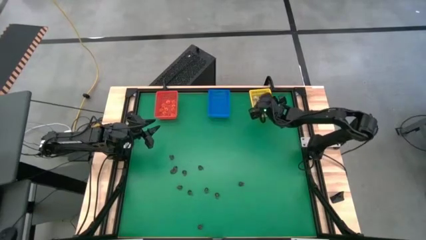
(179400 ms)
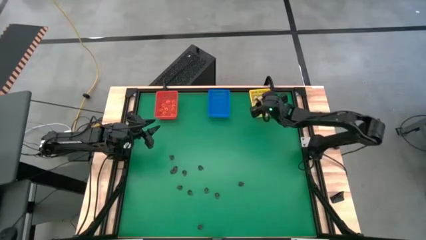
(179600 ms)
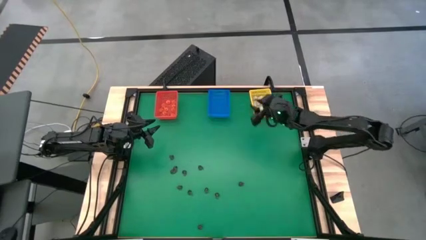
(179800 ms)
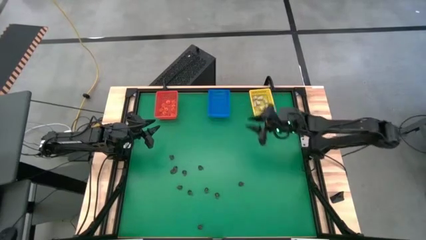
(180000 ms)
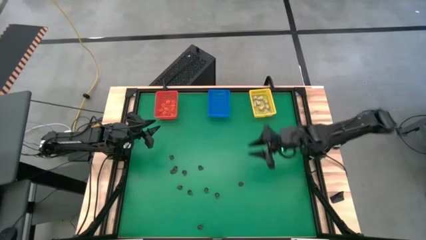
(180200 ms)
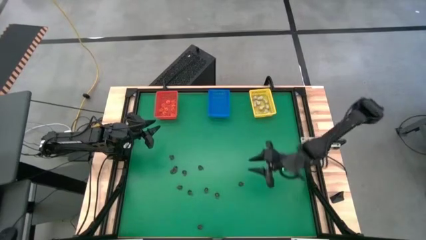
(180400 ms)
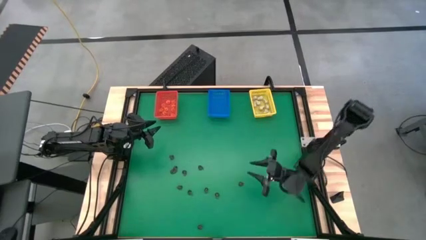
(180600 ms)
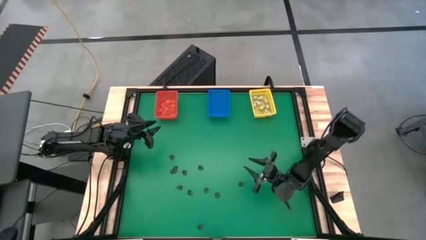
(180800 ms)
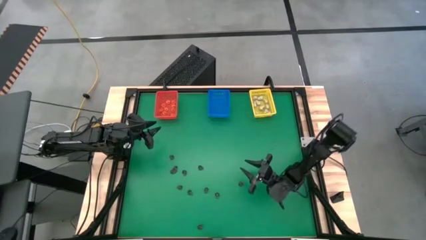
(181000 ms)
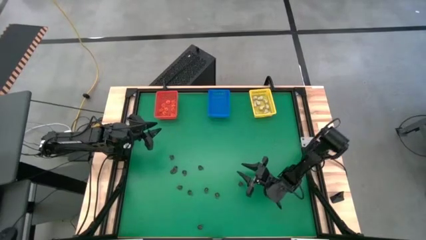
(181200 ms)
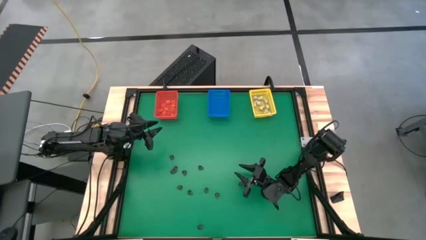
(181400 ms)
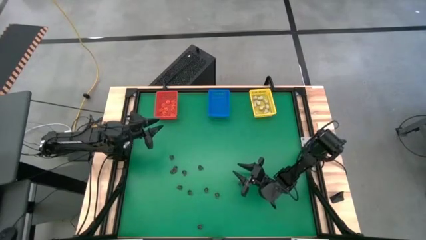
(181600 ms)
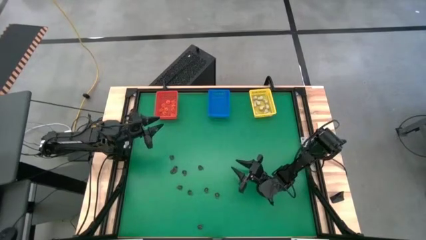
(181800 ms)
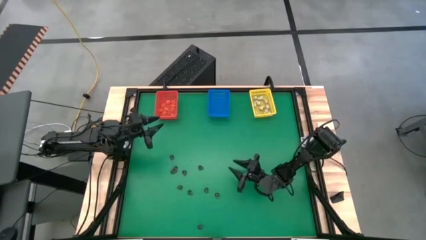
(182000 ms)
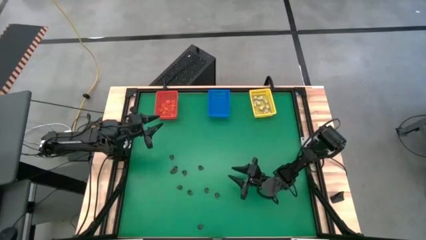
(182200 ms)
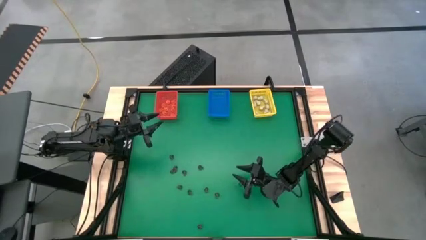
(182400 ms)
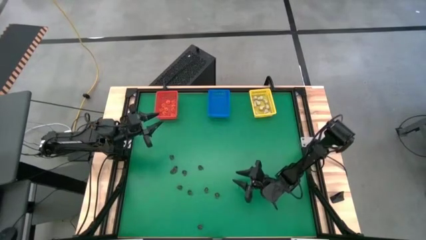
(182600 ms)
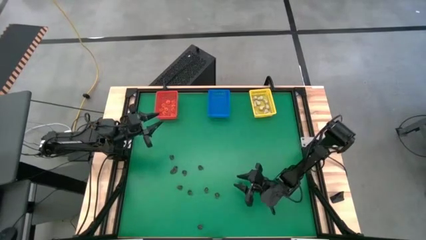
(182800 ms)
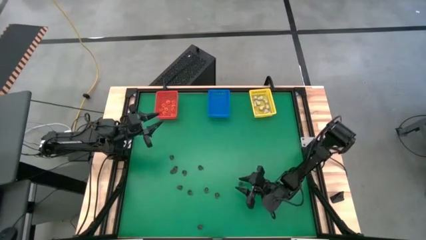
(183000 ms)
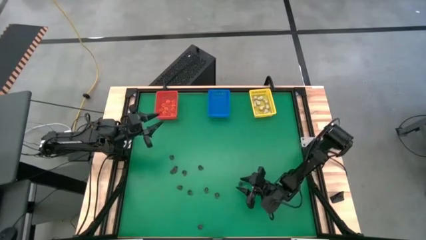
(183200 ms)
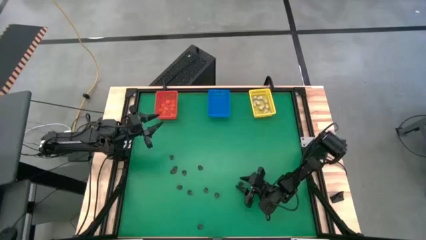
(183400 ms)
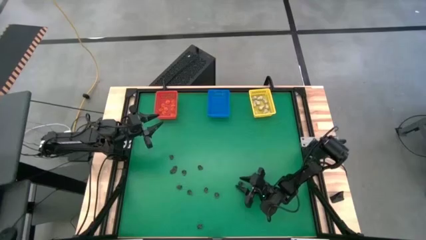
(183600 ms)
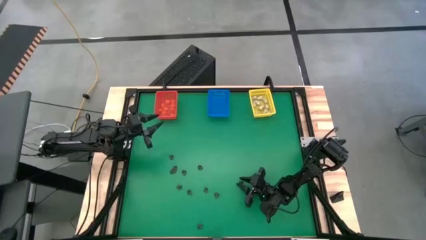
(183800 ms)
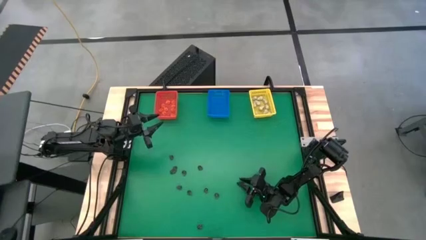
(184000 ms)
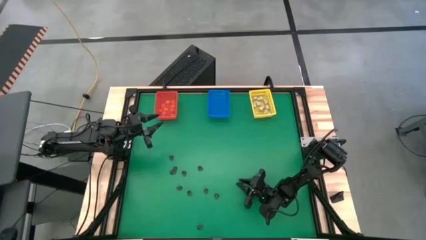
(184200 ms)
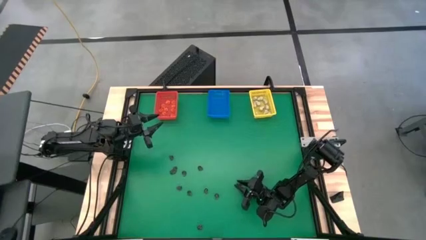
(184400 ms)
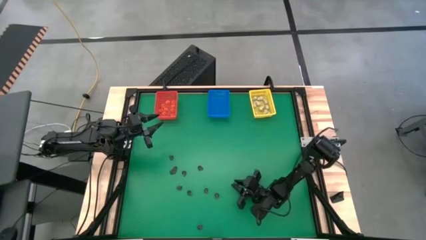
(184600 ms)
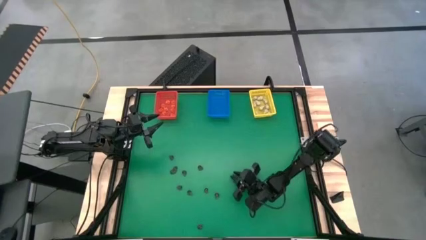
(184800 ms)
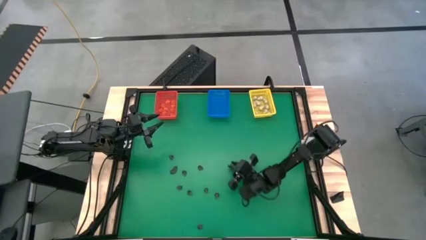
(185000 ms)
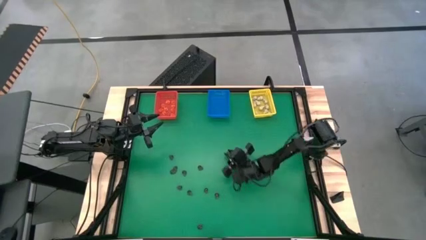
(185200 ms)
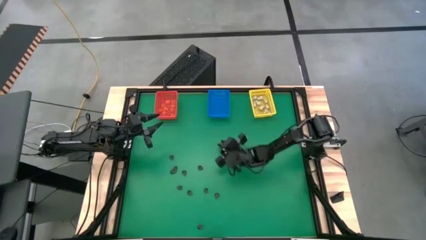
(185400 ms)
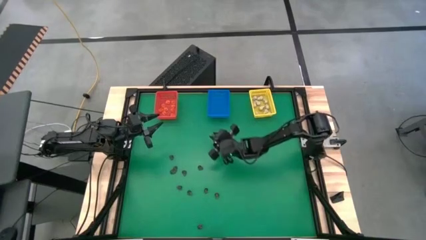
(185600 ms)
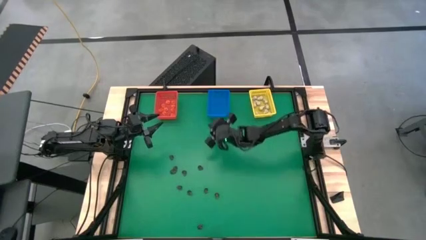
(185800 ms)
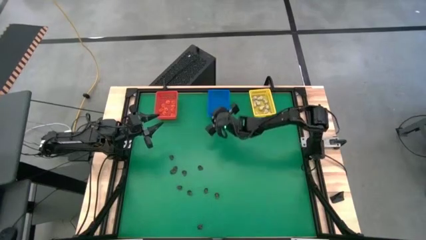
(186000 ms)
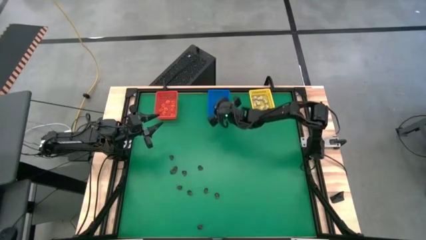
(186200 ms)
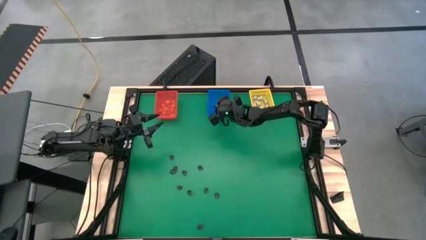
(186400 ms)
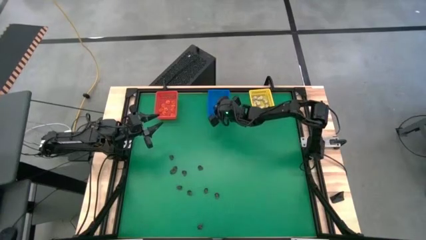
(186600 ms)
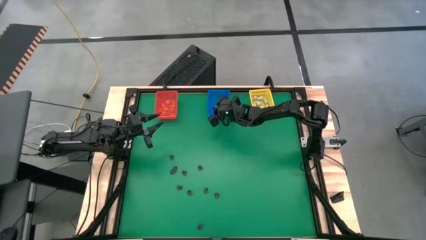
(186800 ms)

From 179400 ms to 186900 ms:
Task: Sort Halloween decoration
Put the black skull toy into the blue bin

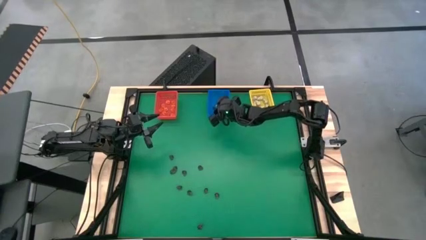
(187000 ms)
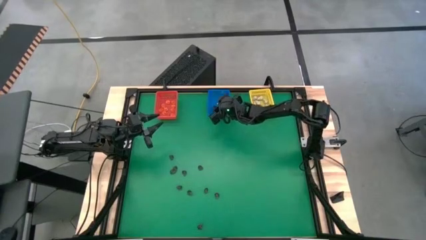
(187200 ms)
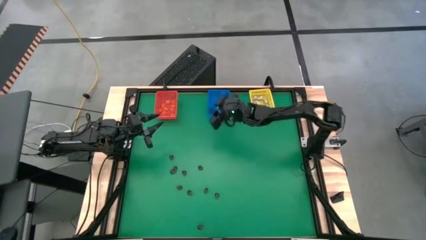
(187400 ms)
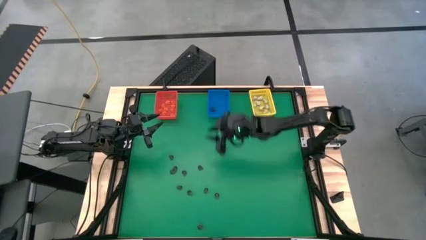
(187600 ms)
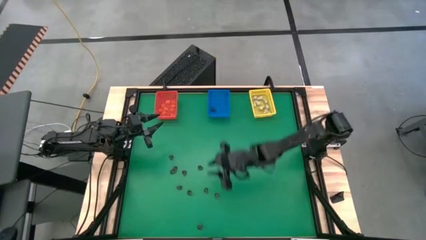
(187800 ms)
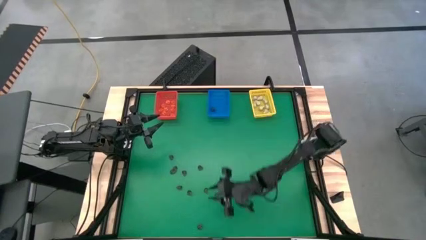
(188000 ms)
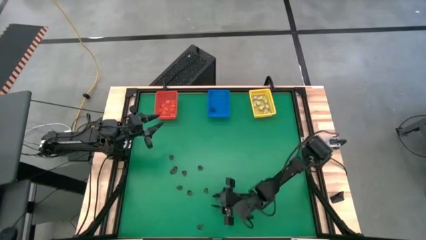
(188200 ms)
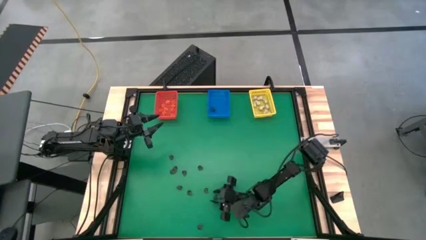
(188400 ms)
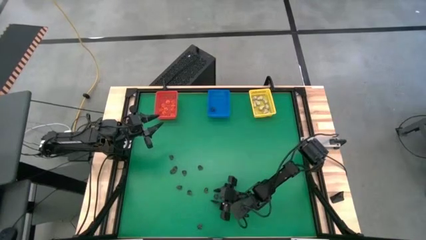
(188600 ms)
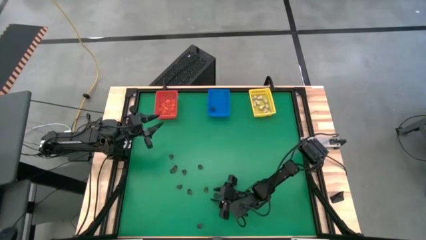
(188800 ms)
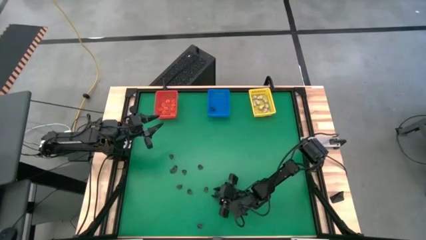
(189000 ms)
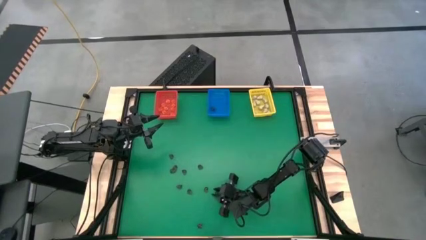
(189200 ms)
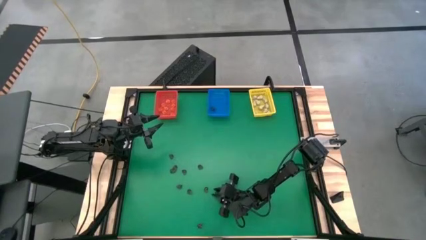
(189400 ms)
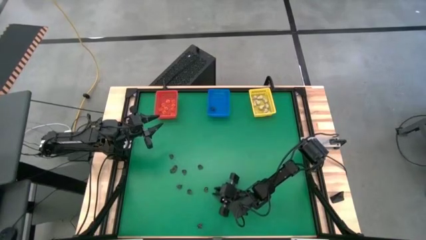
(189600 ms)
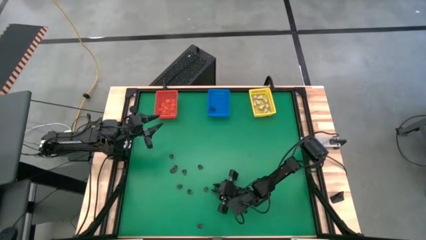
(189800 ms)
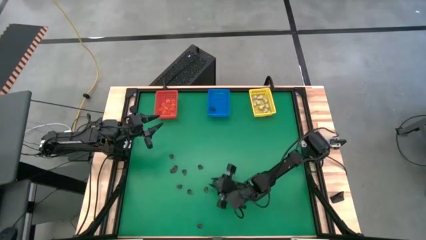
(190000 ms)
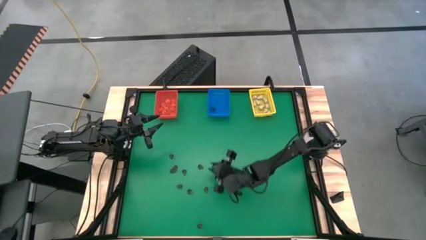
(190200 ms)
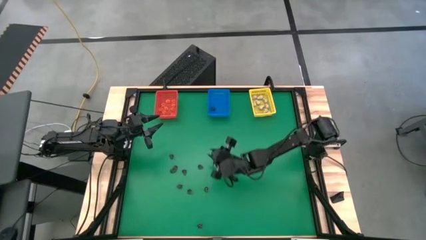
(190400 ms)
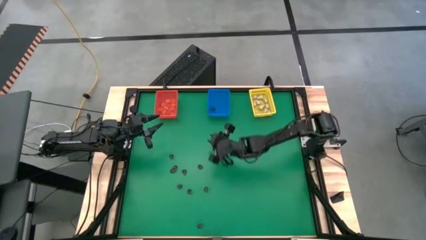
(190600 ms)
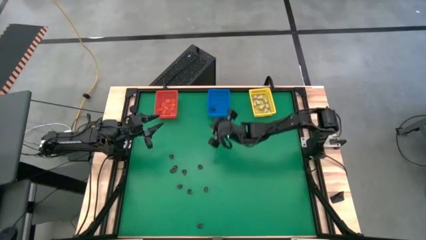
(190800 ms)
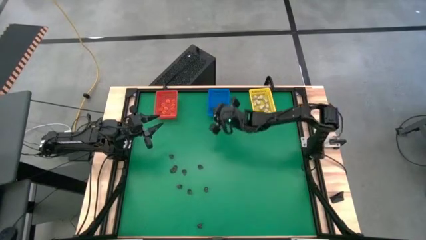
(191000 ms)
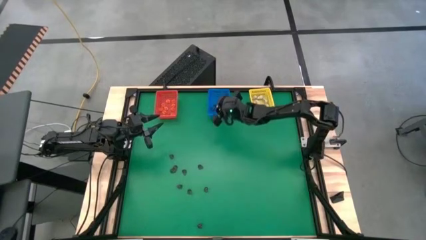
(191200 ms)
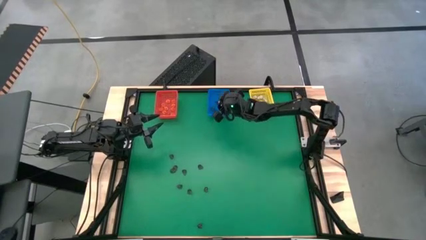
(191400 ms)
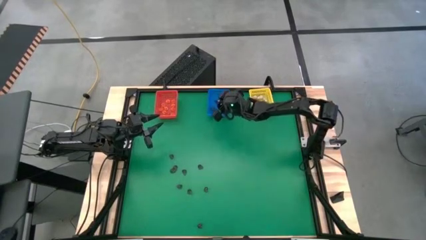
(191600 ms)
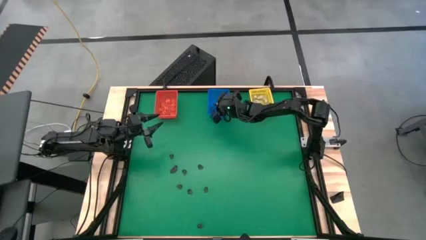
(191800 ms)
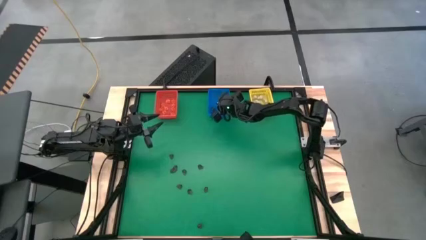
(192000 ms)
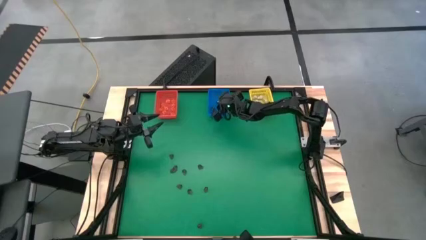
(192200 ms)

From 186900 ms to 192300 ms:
Put the black skull toy into the blue bin

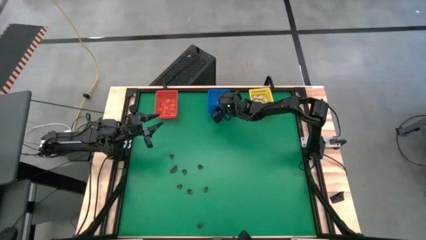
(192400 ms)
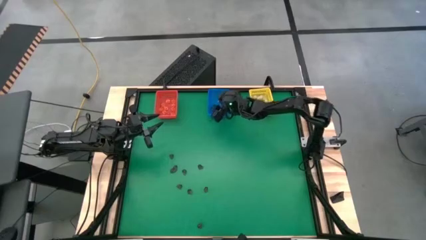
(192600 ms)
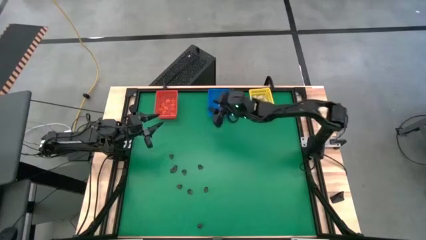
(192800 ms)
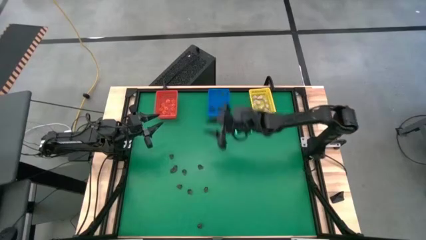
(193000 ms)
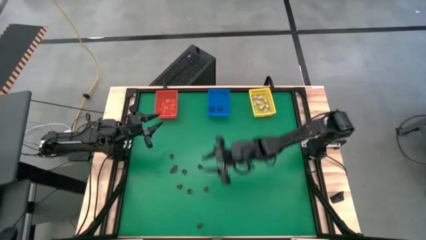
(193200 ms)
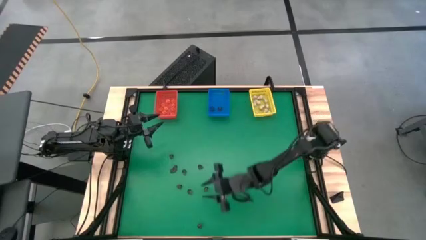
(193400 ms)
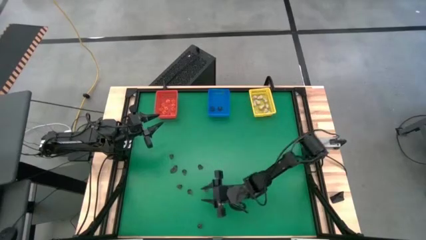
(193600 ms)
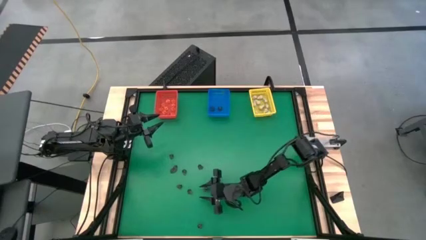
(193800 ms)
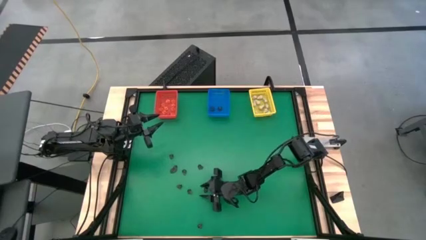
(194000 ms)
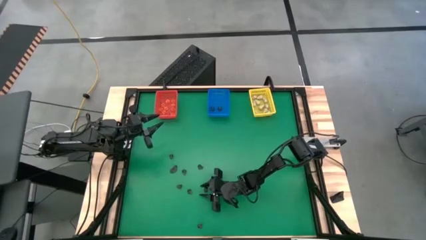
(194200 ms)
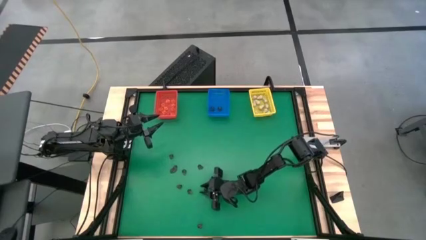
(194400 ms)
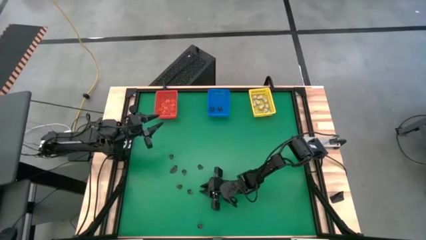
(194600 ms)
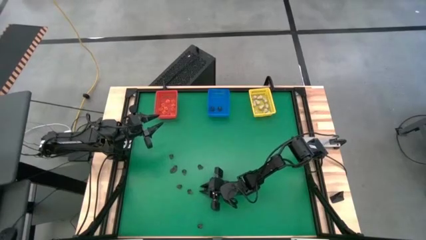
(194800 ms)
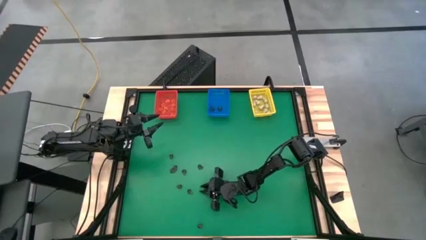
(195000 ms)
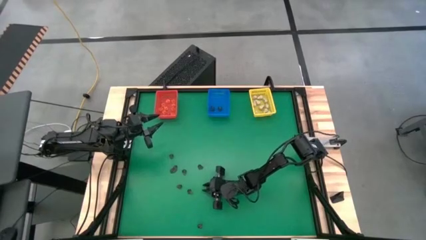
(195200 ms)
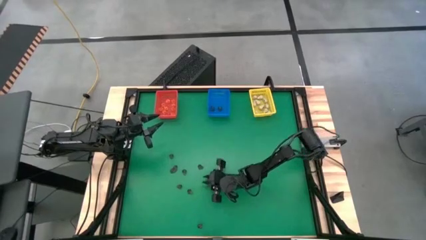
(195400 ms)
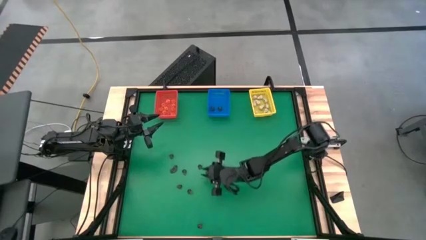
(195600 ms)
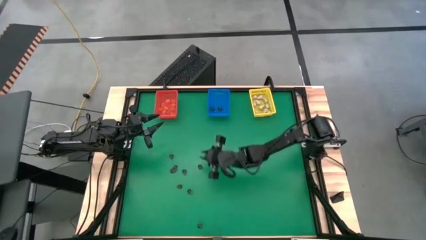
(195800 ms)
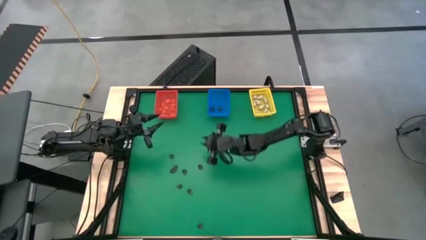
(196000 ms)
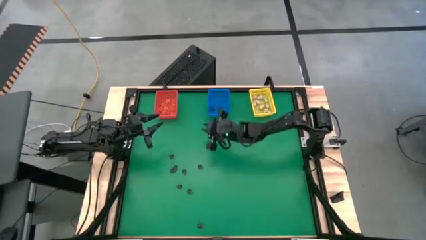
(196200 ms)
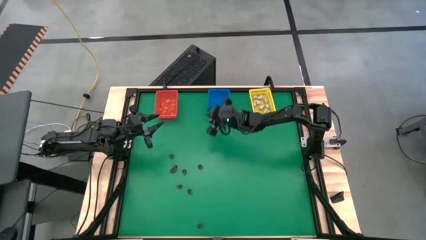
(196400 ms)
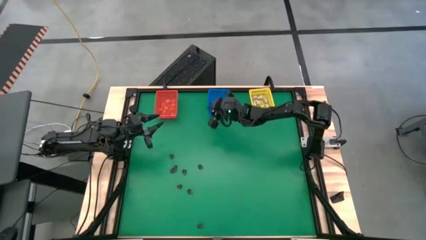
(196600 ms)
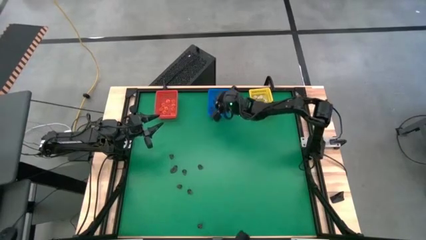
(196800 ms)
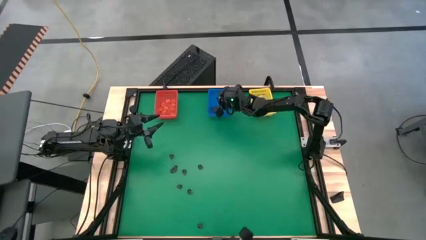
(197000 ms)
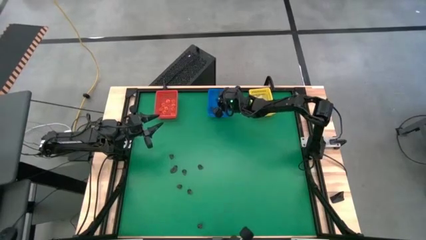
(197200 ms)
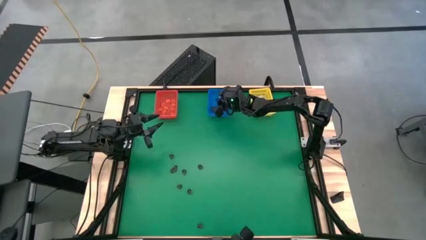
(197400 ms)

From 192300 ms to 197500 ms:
Put the black skull toy into the blue bin
